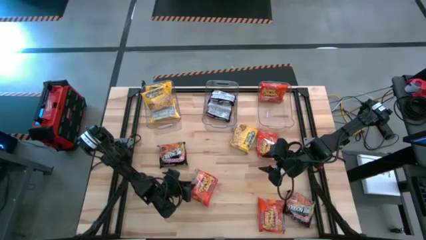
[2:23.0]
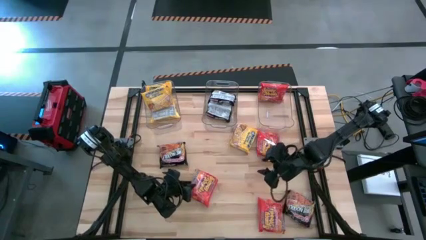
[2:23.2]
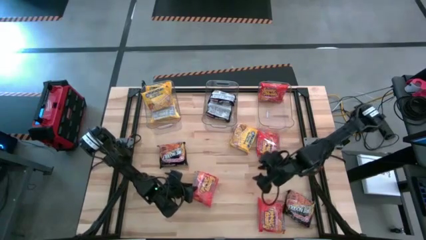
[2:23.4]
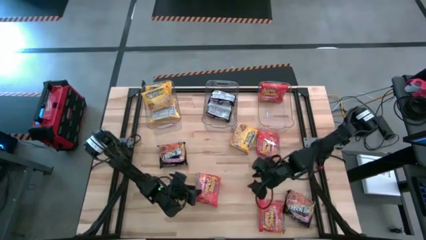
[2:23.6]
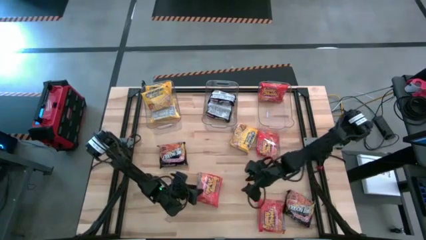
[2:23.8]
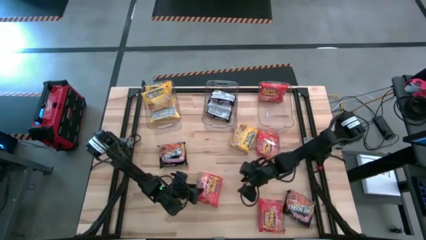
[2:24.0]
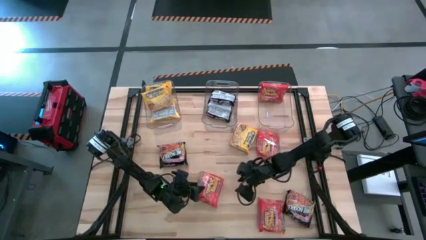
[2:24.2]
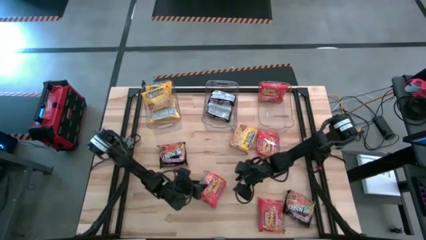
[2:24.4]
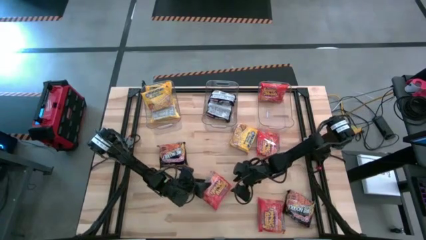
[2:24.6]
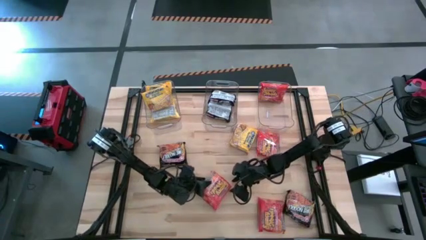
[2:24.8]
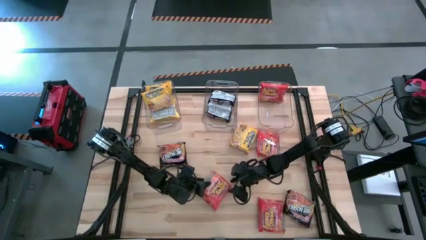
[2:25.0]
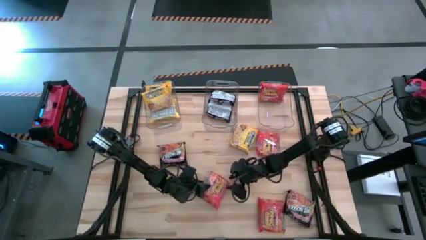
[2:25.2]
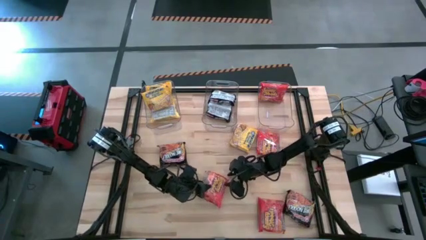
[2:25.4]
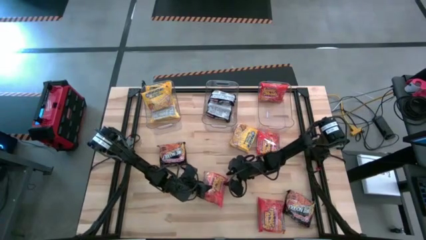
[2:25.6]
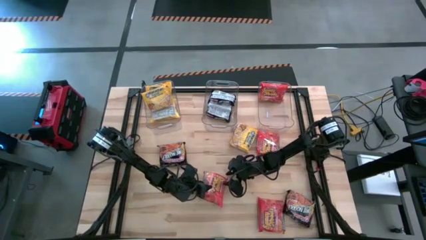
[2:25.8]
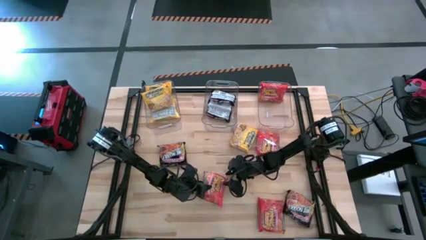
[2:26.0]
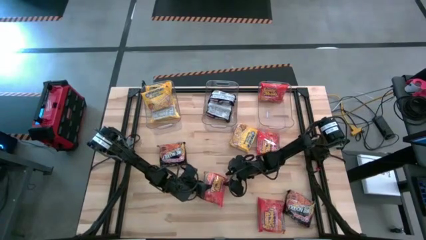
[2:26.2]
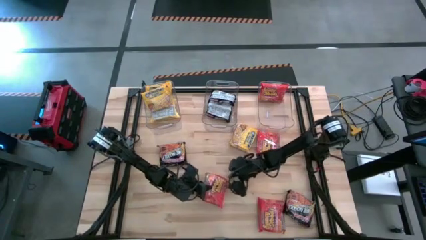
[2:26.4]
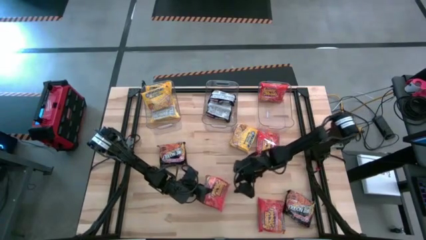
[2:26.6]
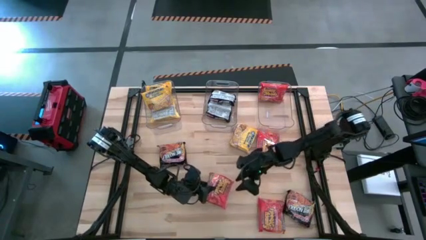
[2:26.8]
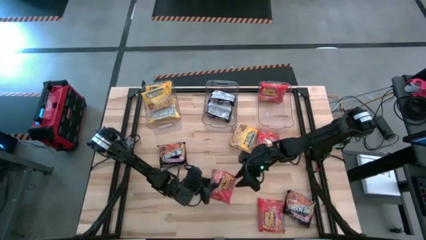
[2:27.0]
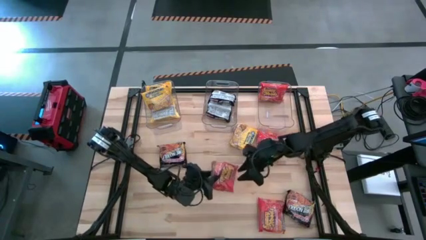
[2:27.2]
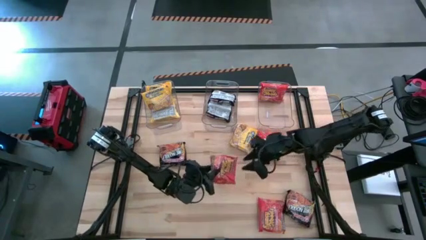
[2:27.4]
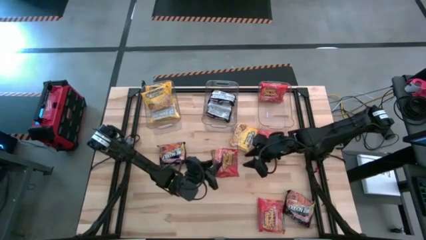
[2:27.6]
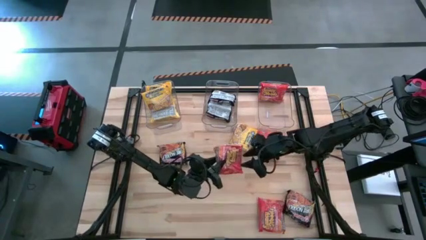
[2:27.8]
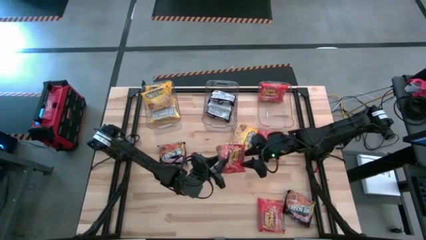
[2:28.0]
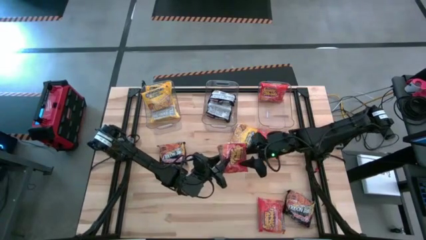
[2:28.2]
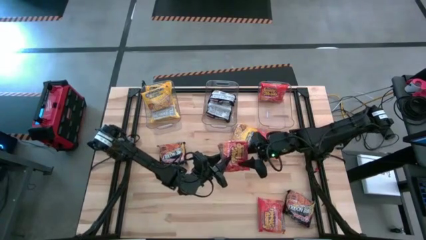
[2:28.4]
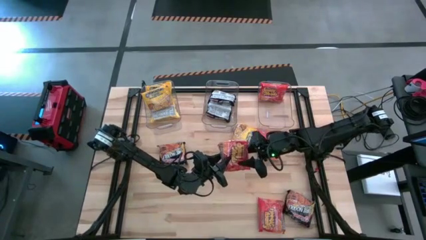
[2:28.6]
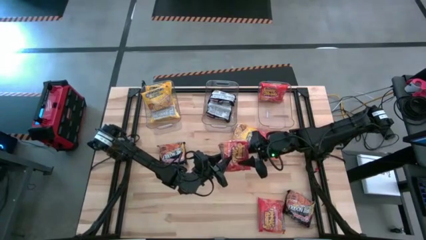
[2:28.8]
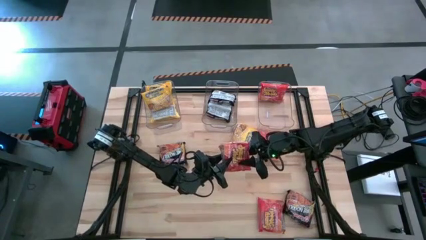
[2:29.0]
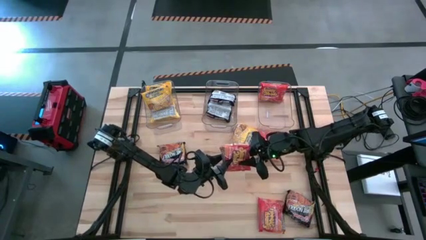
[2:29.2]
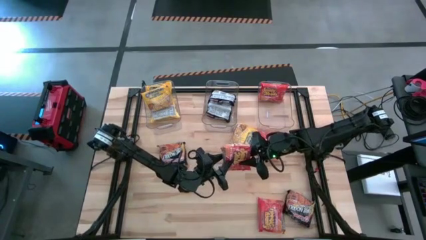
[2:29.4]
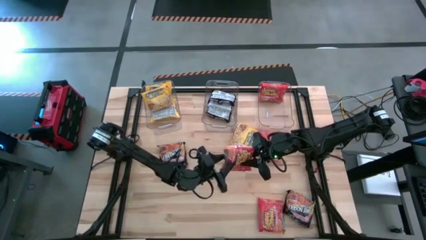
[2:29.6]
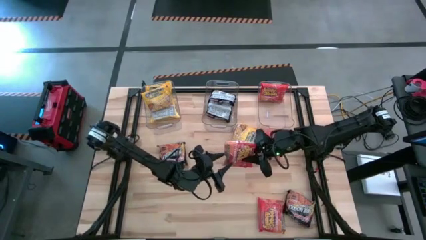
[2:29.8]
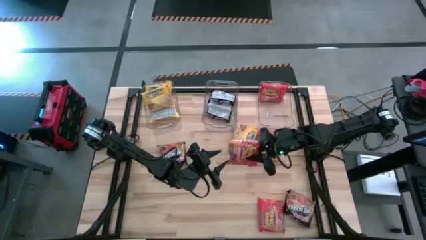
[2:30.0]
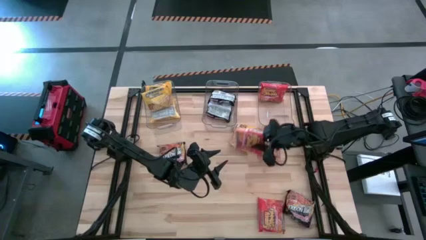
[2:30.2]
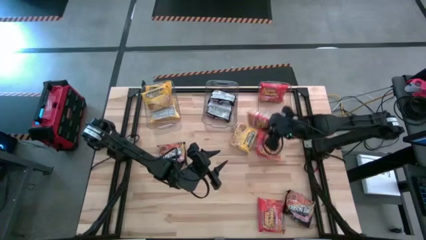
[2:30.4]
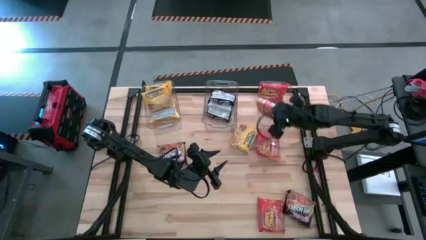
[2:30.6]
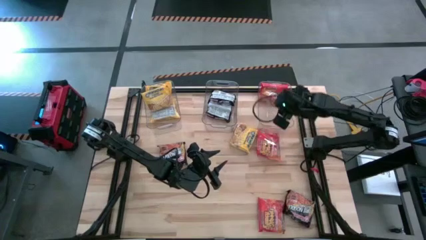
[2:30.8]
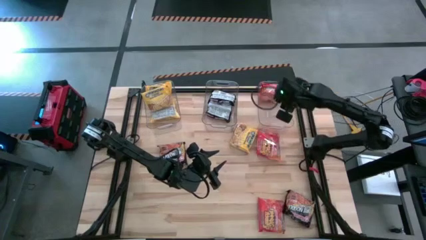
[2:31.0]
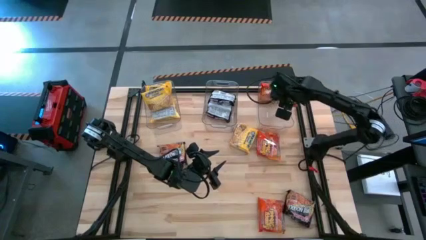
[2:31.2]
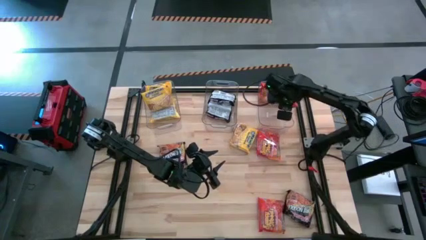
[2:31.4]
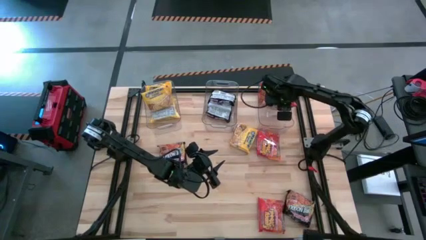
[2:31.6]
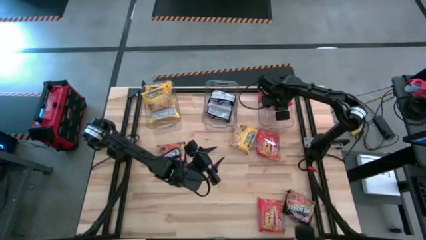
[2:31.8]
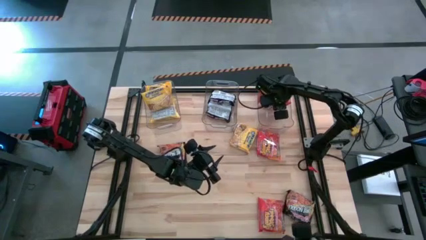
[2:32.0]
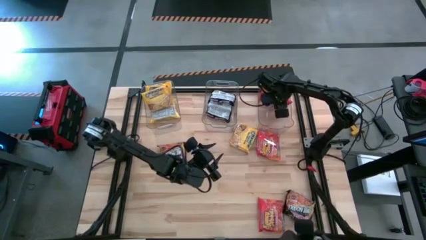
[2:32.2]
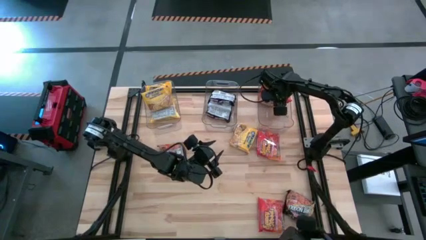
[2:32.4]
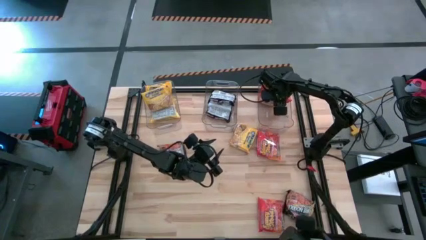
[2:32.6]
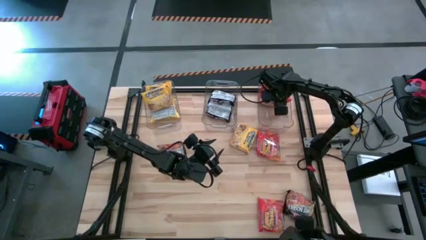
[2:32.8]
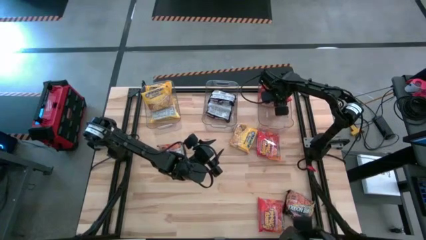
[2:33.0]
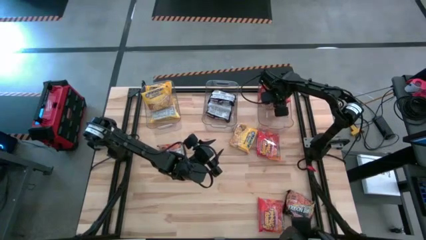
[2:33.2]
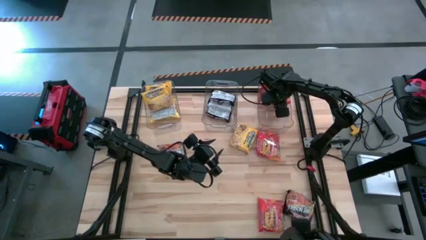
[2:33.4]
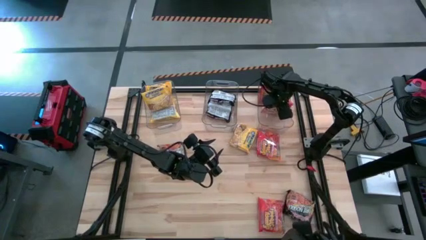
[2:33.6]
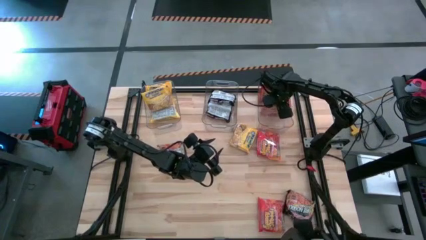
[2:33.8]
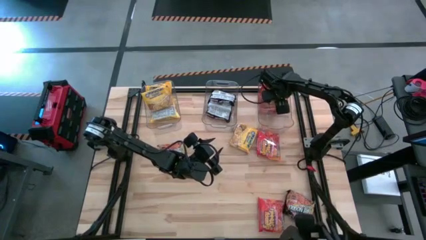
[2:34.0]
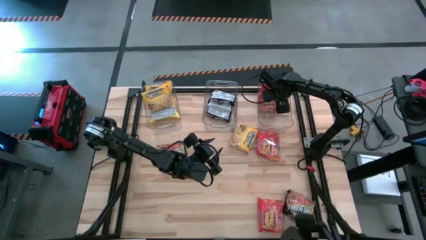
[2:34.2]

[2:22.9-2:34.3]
Task: Sort Maruchan noodles
Put the orange noodle pack into the right transparent bin

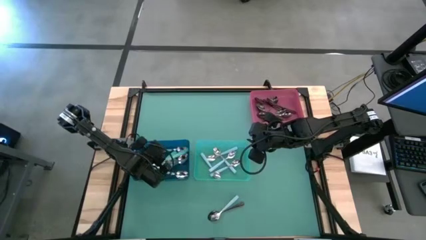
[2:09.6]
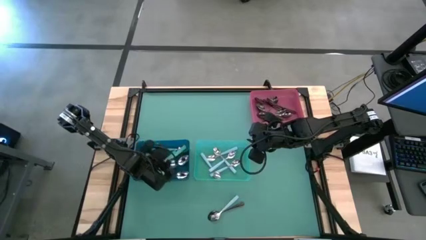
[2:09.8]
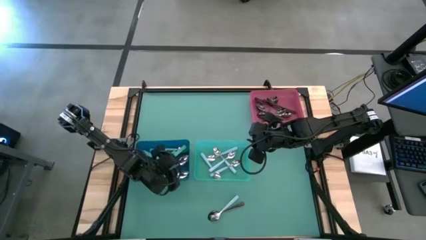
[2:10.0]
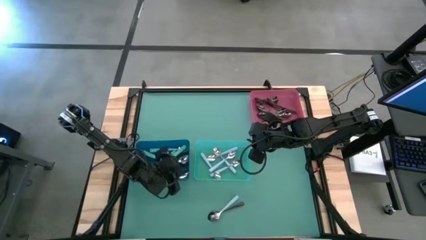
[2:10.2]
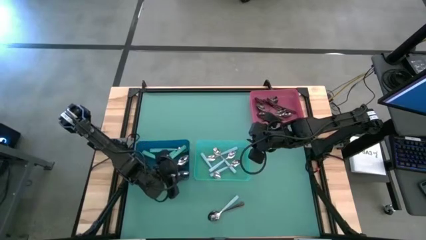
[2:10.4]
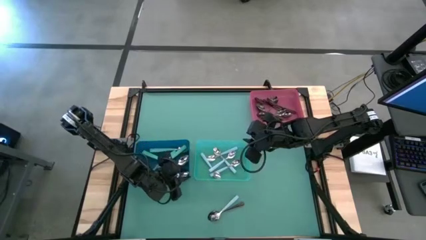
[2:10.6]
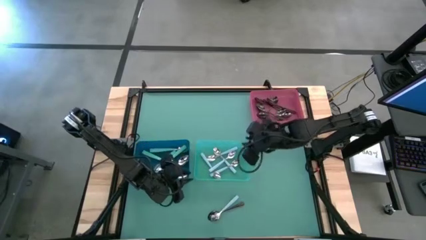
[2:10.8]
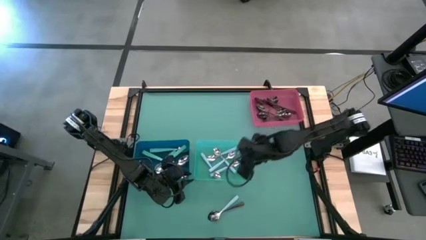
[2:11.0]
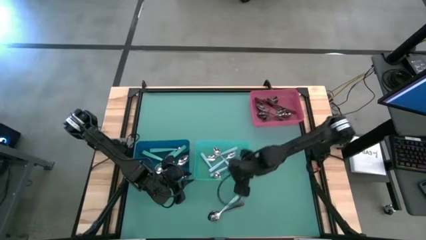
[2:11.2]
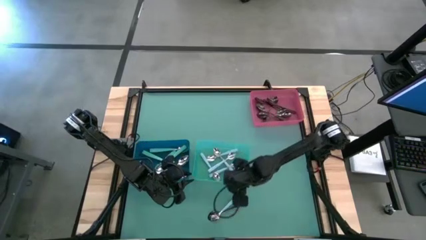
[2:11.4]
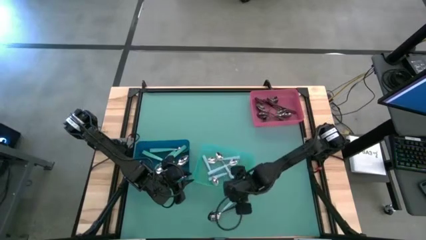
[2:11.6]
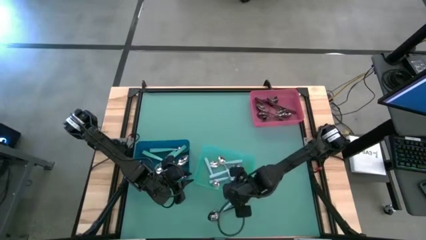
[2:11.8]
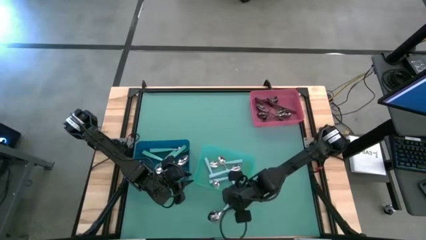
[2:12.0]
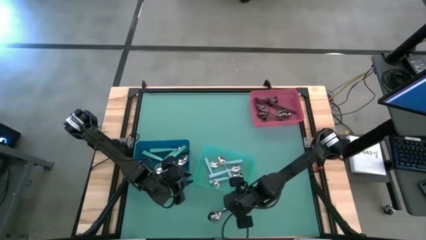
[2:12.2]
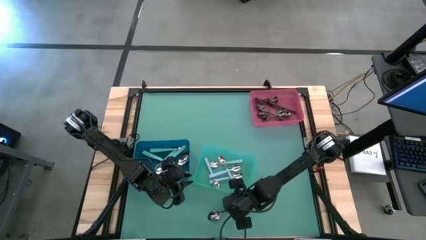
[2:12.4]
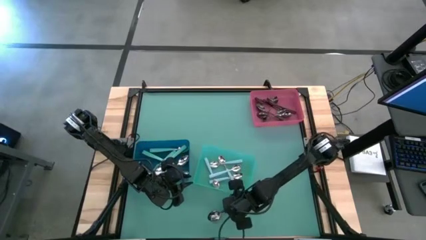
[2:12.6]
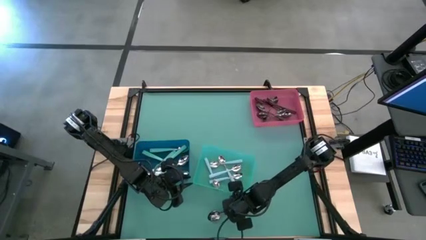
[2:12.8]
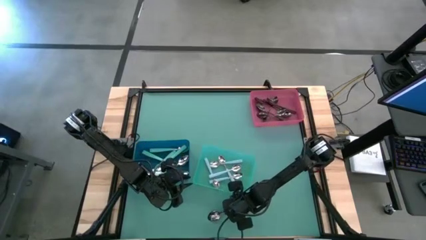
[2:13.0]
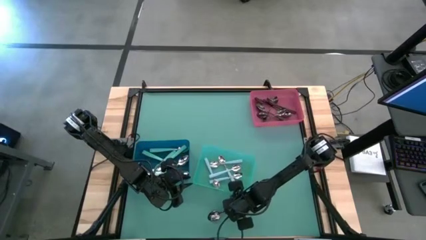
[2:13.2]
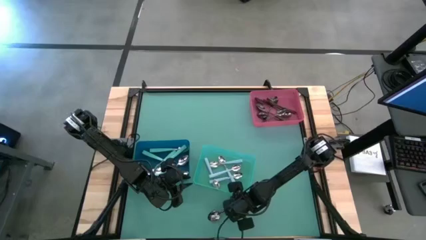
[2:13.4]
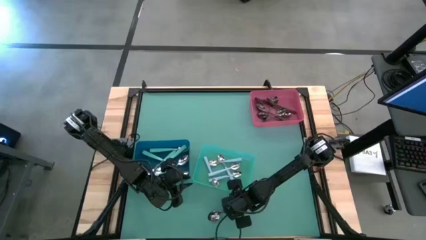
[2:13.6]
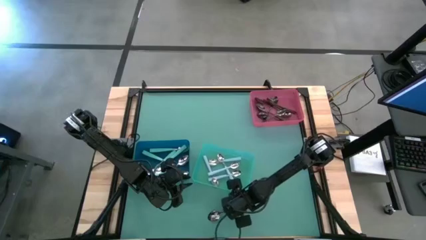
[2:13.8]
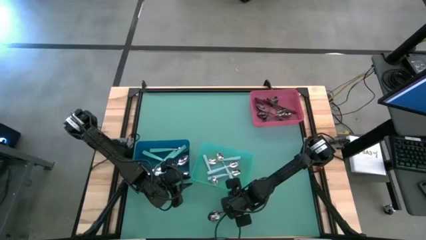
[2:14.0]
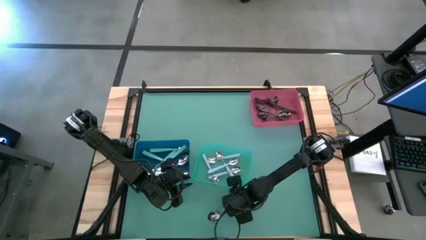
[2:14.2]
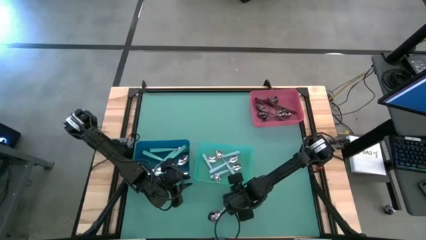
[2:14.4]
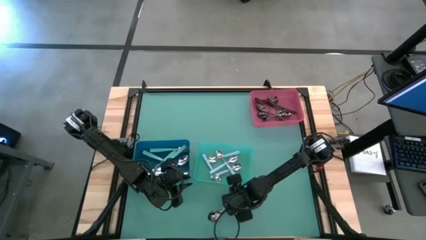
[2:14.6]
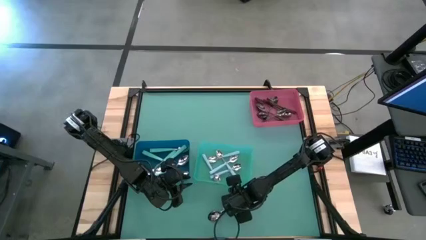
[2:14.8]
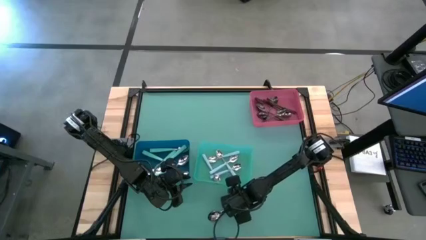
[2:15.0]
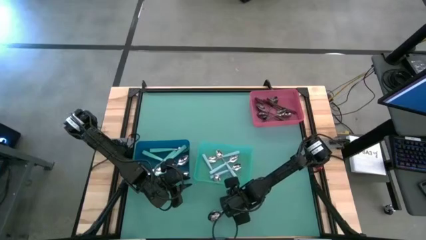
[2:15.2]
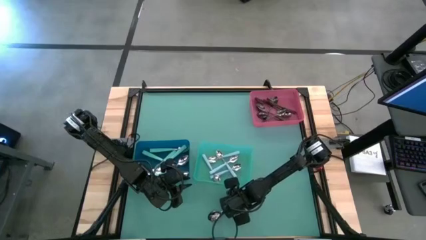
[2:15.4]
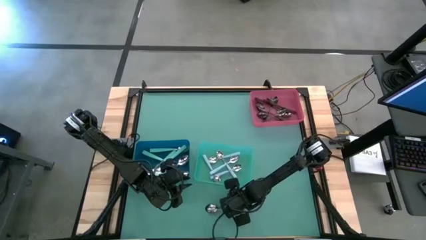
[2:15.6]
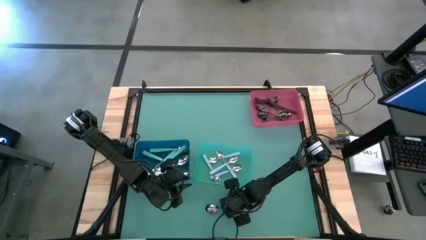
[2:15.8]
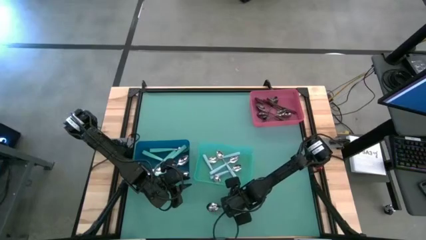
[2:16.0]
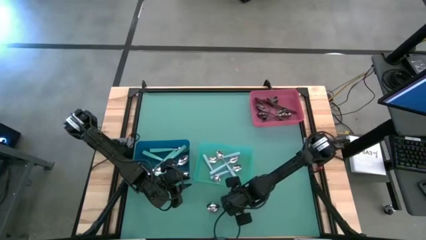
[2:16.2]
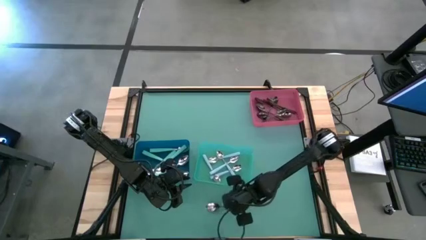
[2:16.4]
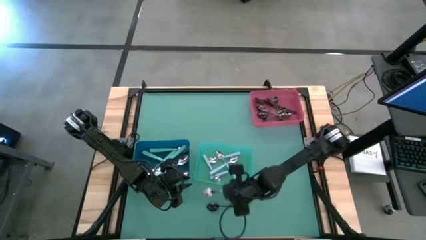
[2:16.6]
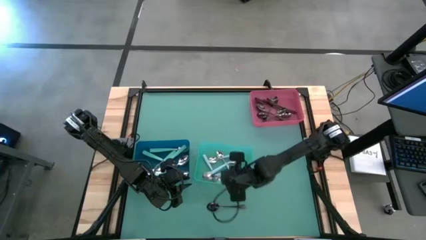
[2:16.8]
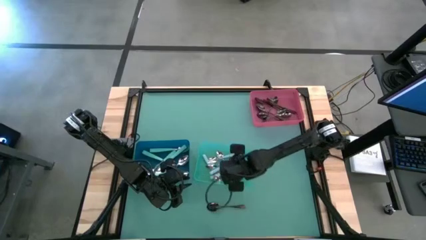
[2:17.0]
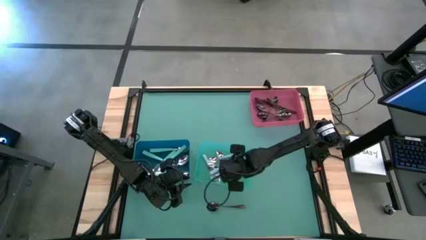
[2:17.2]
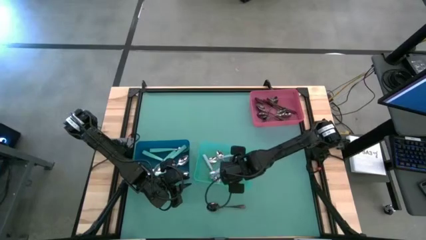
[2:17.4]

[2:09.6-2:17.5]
Task: Sort silverware by color (type)
Put the blue spoon into the green bin
